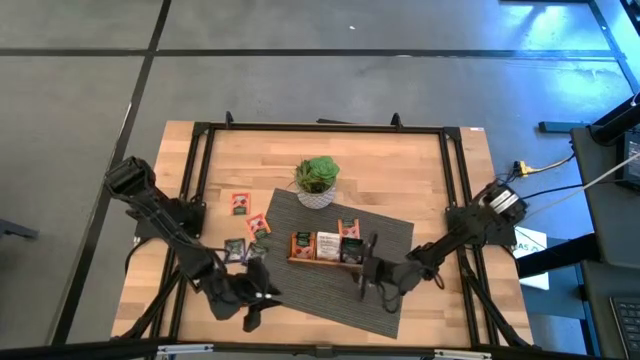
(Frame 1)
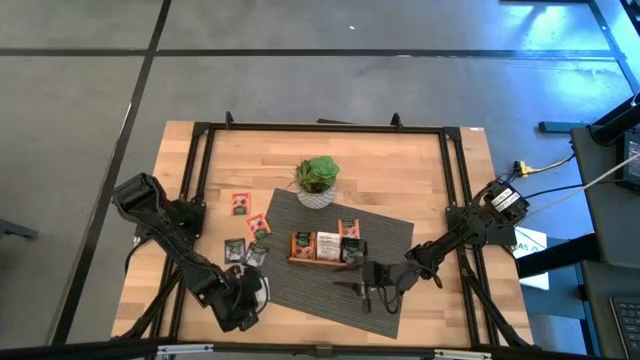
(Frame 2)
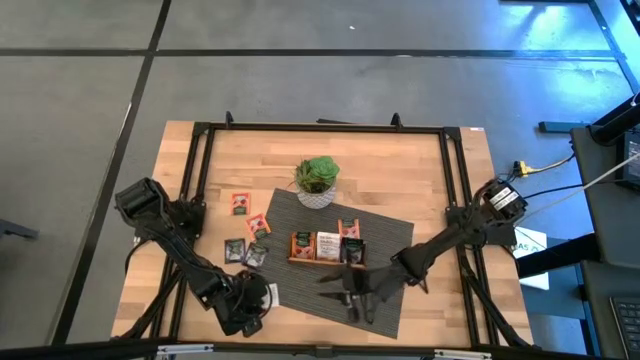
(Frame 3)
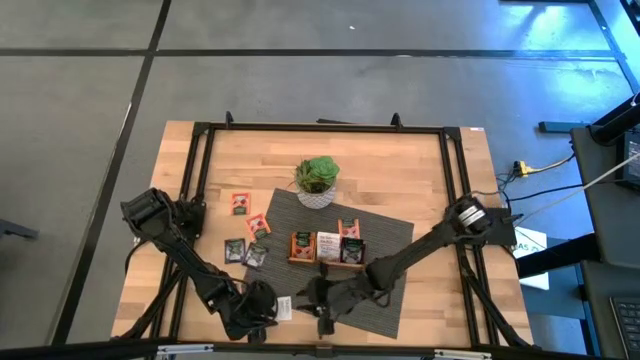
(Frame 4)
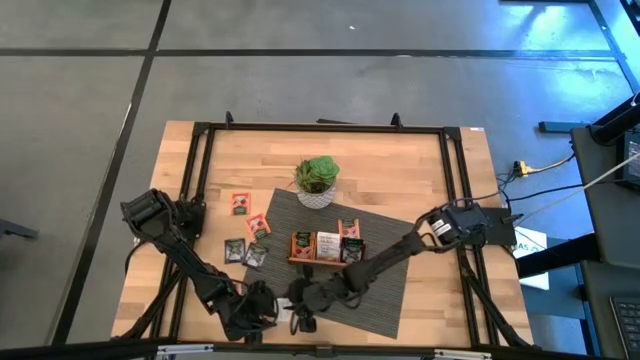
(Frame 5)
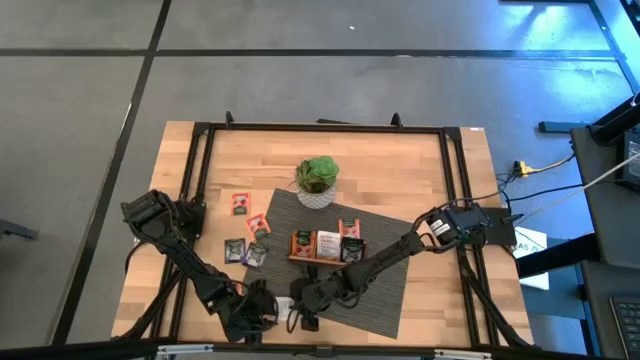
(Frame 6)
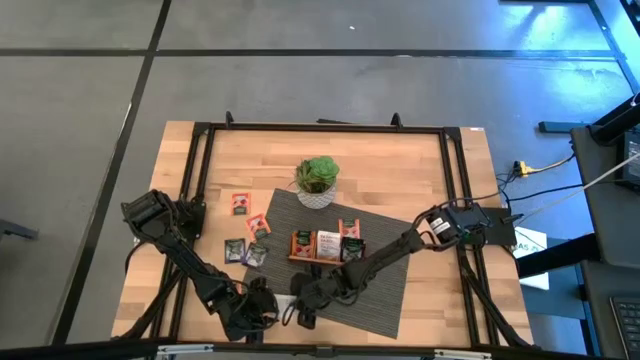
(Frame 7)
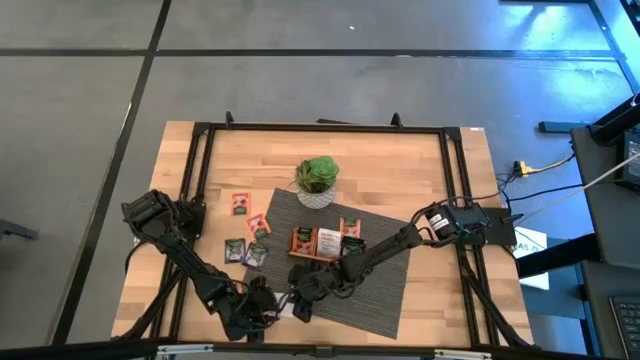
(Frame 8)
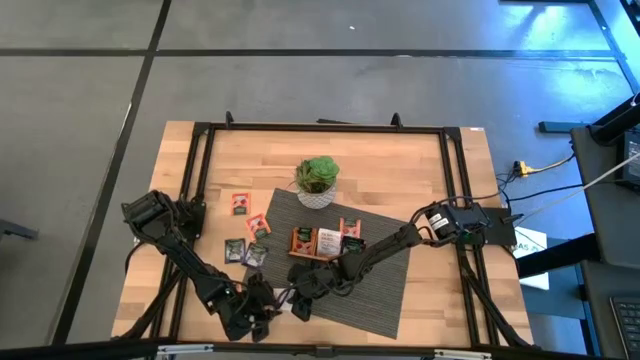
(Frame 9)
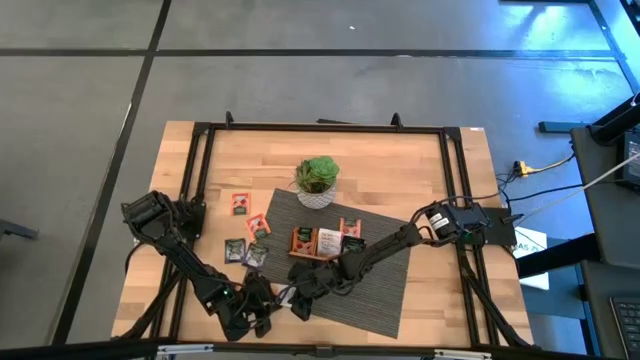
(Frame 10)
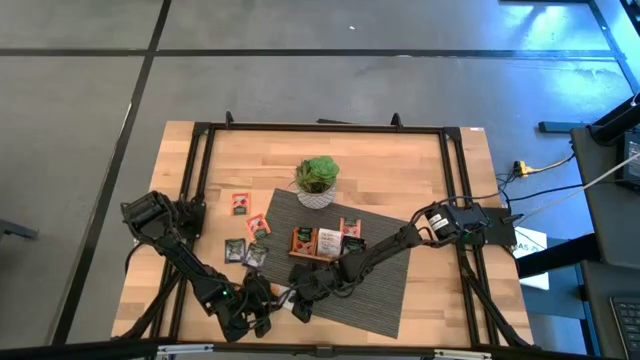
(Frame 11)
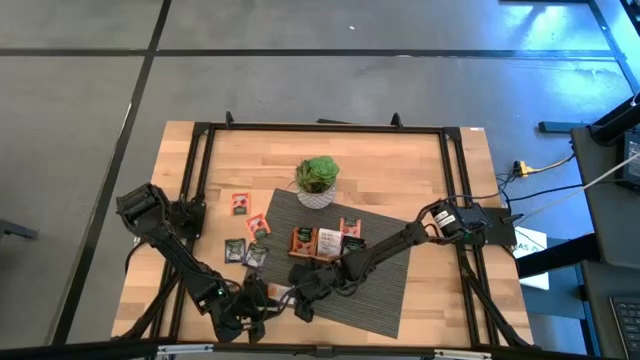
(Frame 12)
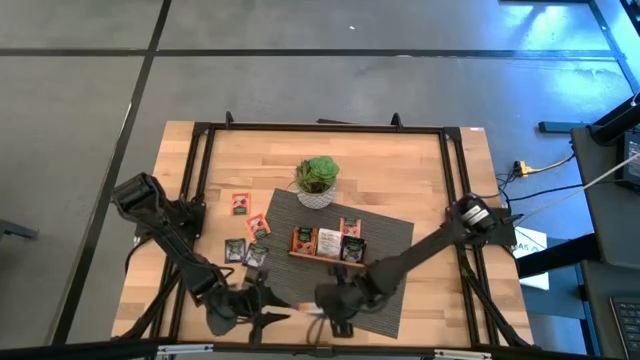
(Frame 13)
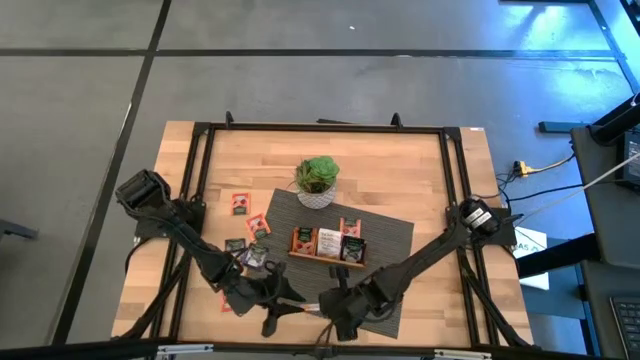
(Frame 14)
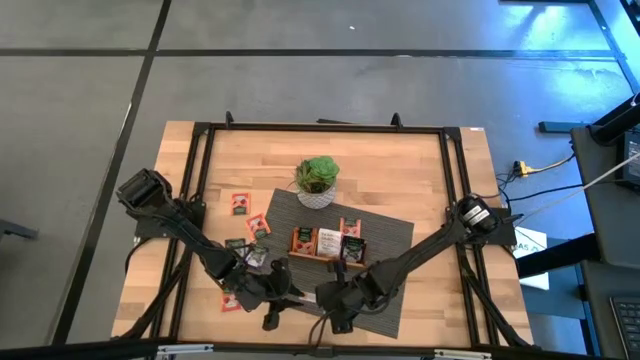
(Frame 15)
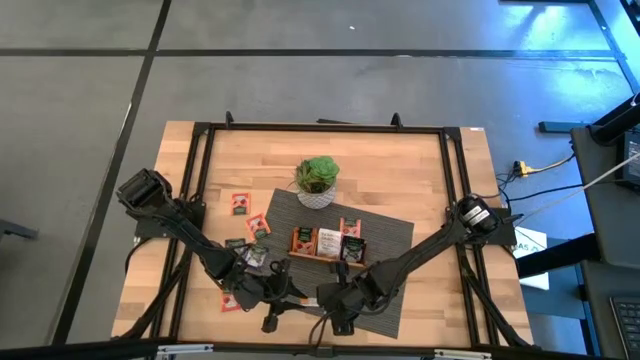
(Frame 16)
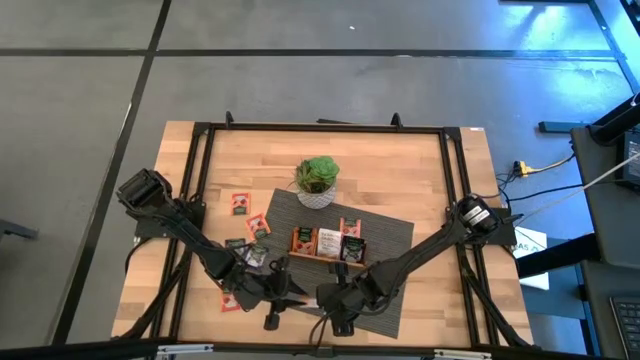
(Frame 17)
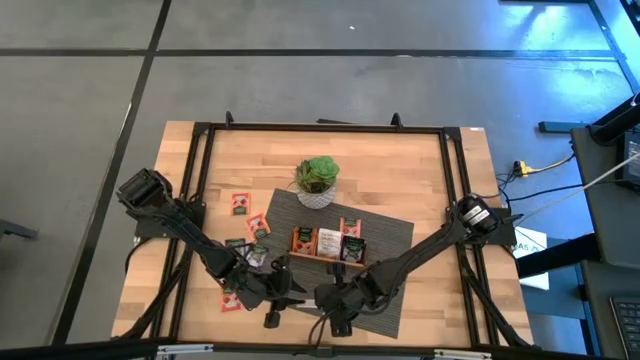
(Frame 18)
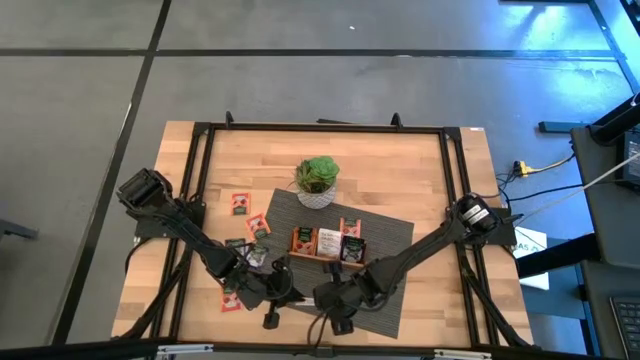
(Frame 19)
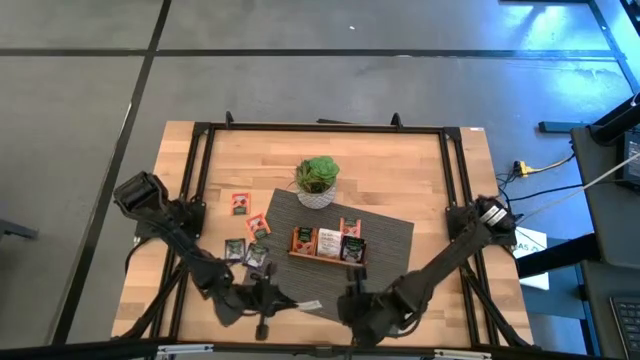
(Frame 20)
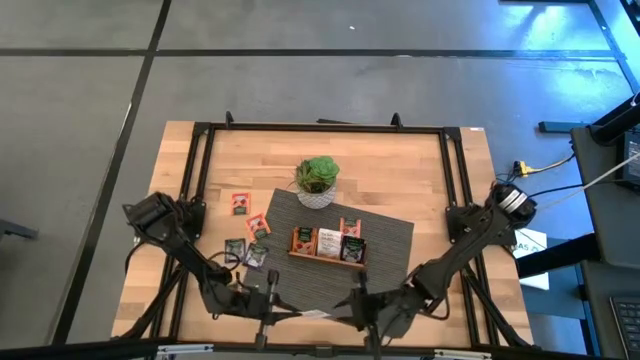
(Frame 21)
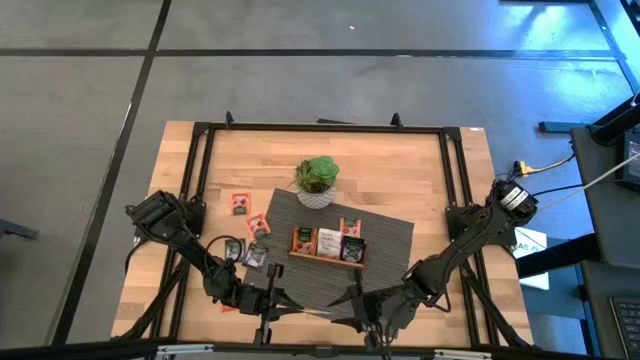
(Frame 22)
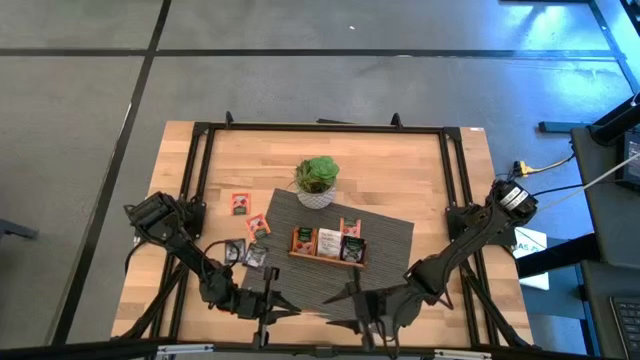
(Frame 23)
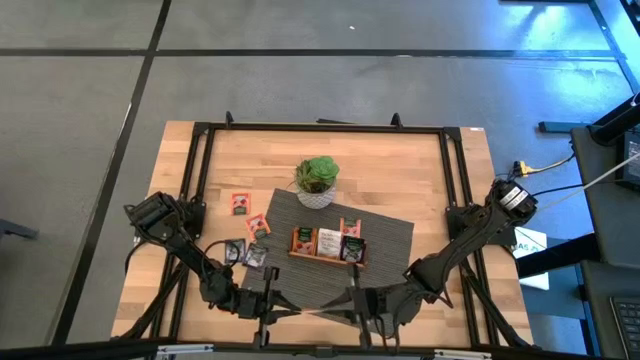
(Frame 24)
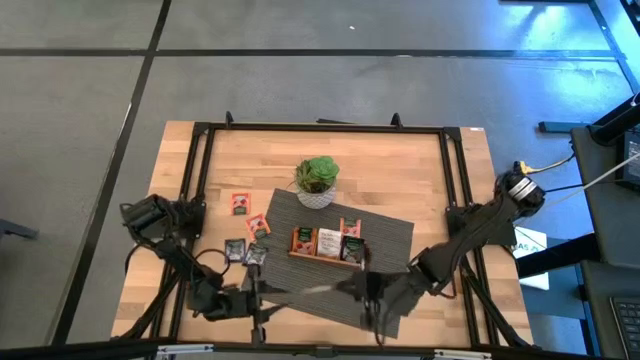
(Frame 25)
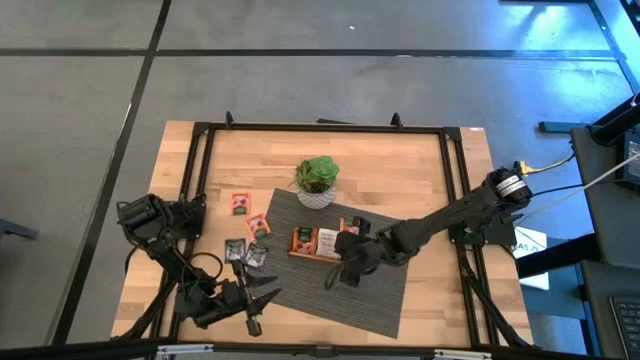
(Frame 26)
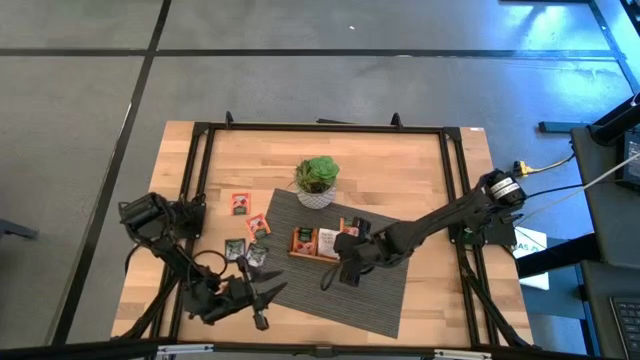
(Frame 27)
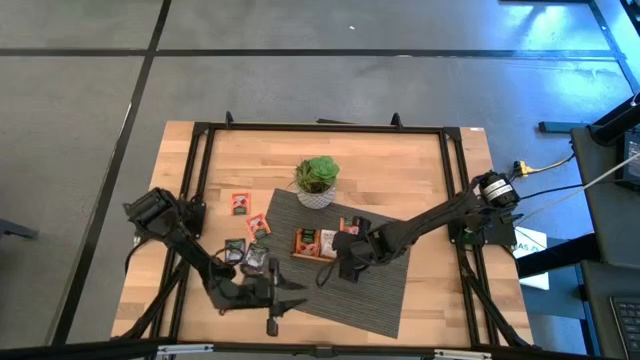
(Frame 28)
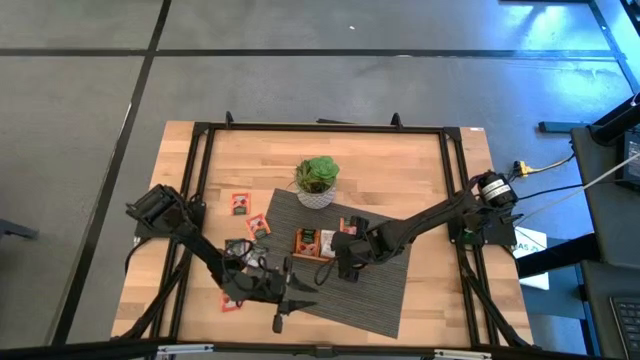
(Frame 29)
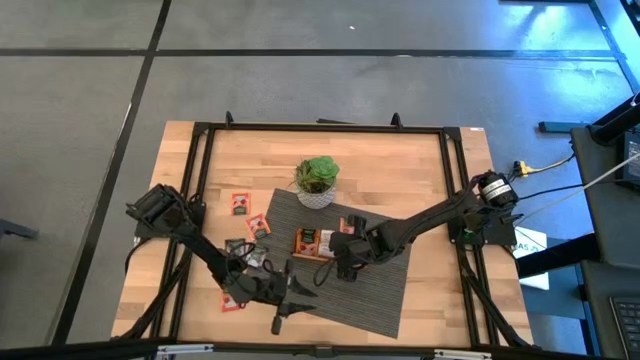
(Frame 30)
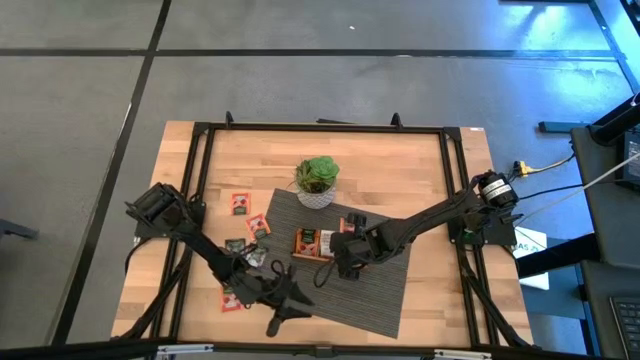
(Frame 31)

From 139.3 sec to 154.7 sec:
Task: Pick & Place Tea
Put the white tea bag into the middle of the wooden organizer

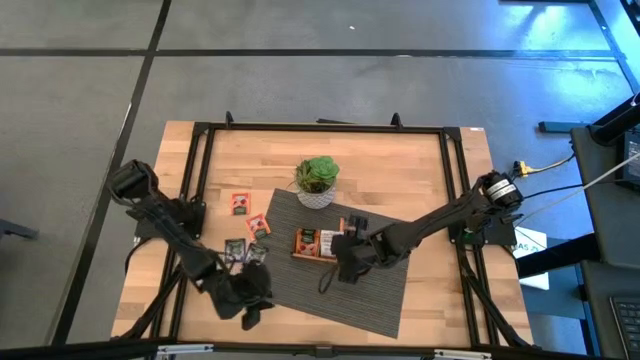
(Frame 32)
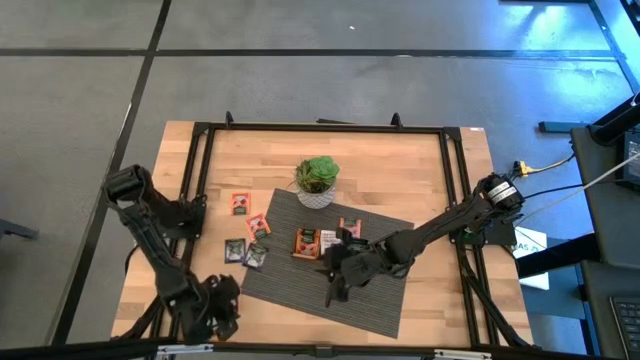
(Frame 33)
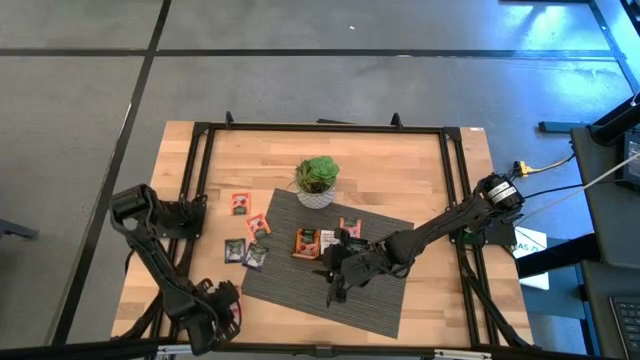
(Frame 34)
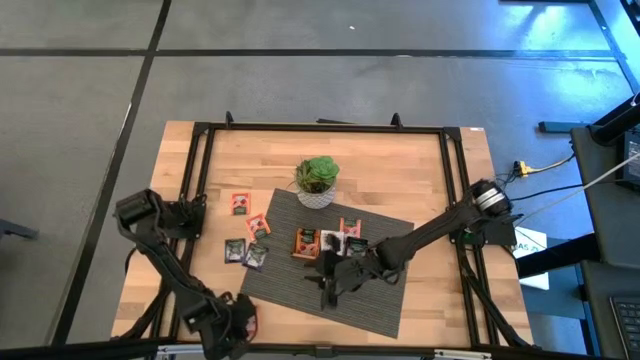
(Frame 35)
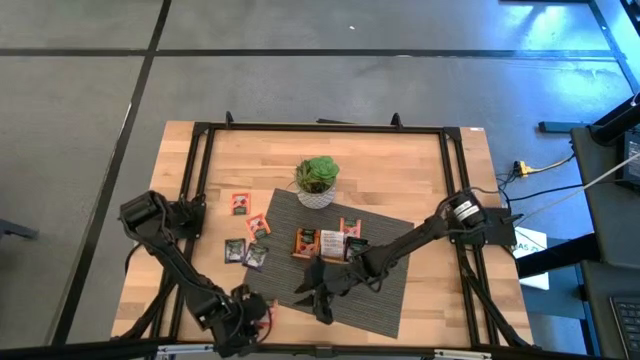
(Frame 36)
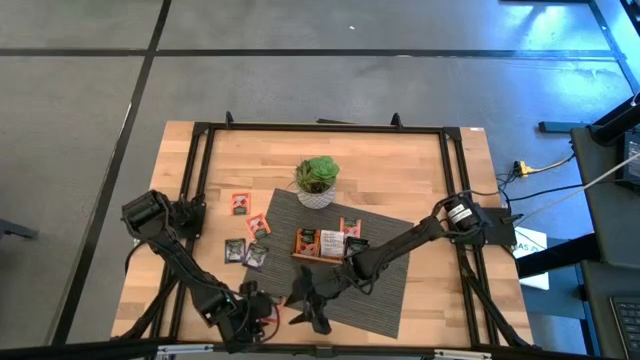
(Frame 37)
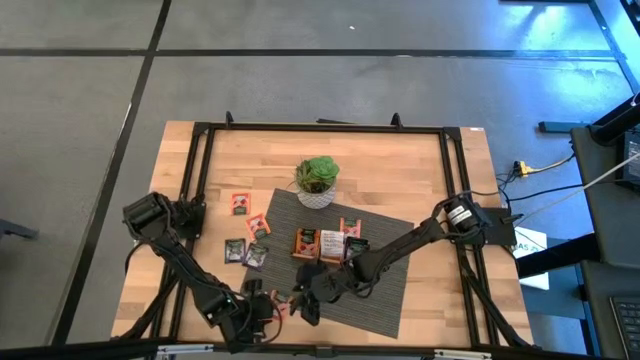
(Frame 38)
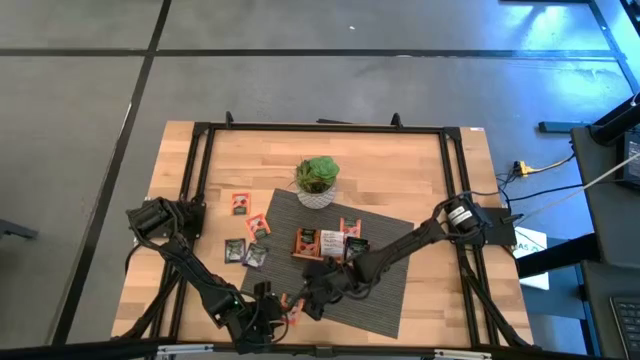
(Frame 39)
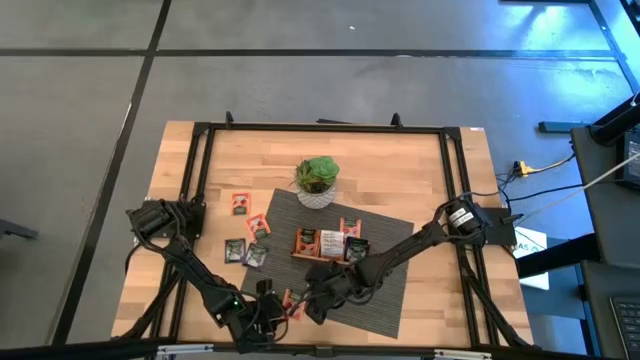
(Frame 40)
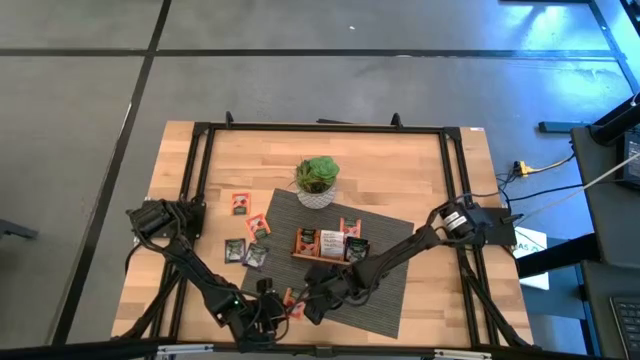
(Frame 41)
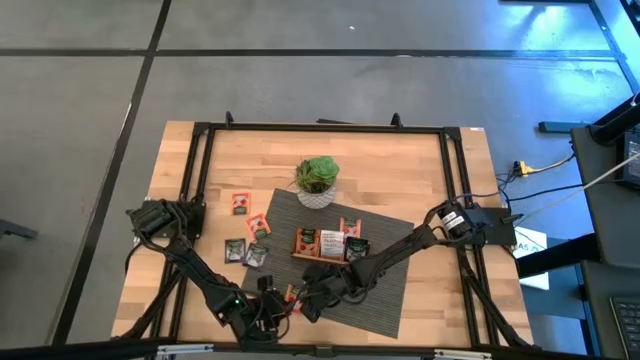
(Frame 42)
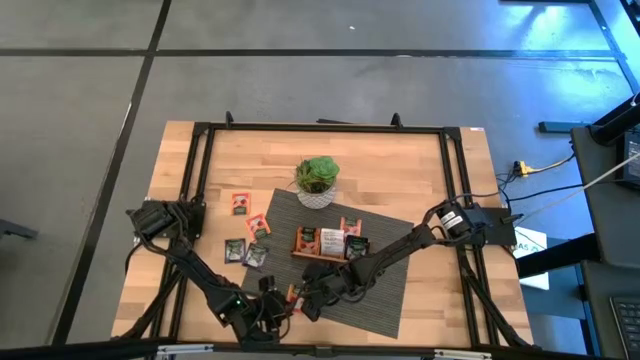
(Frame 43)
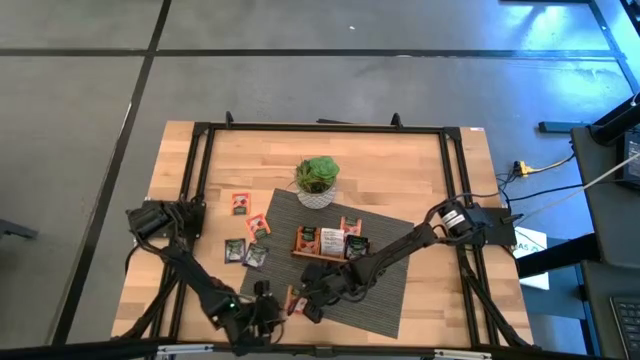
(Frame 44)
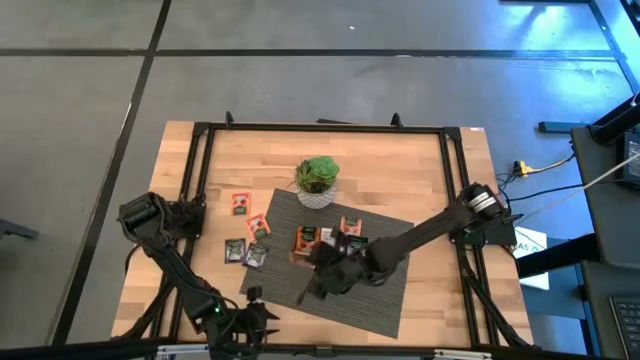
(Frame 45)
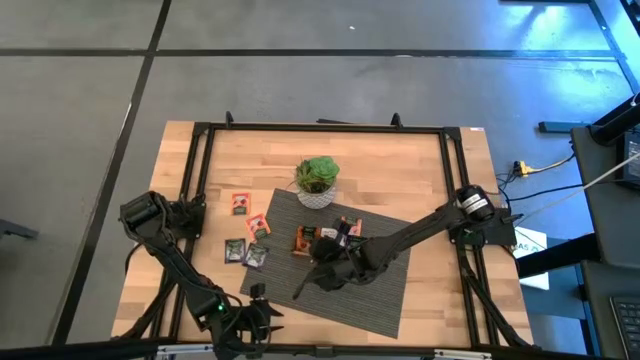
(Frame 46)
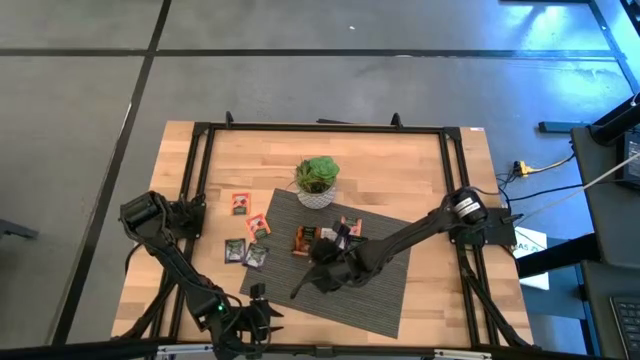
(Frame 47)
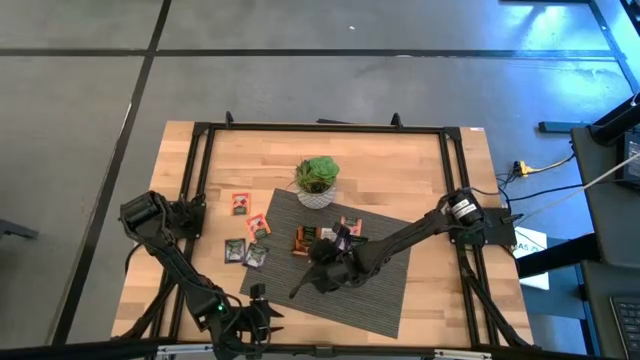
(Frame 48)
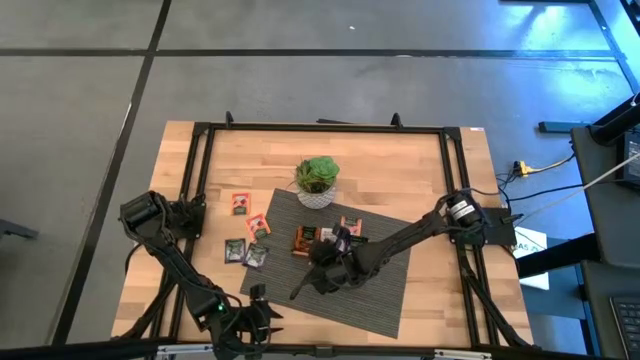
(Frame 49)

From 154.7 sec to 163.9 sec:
Put the orange tea bag into the left section of the wooden organizer
